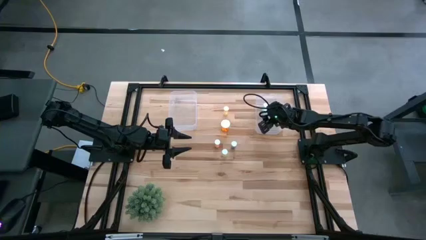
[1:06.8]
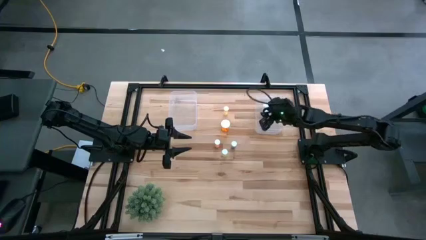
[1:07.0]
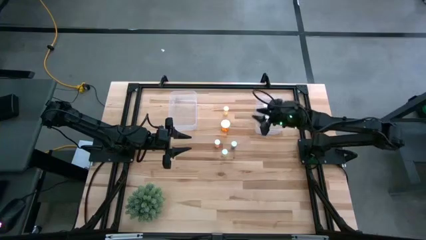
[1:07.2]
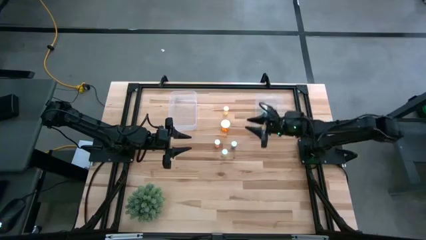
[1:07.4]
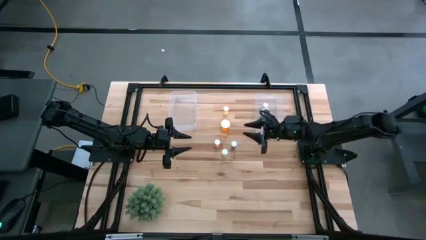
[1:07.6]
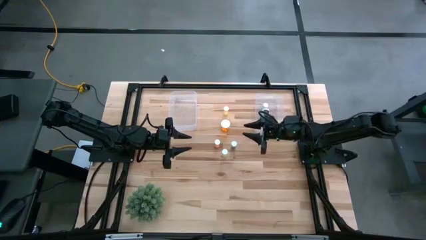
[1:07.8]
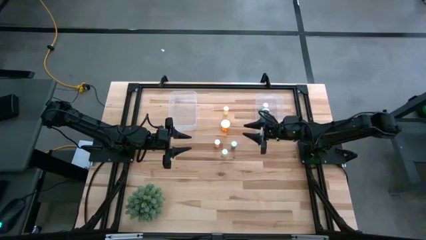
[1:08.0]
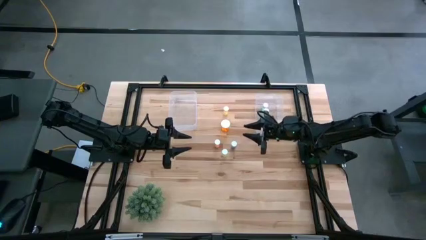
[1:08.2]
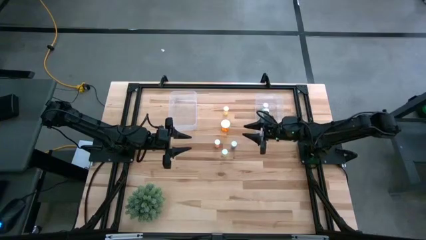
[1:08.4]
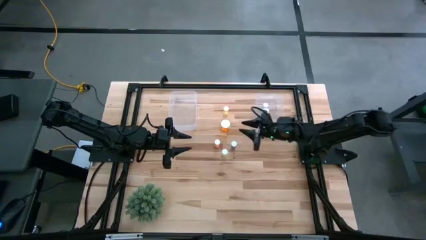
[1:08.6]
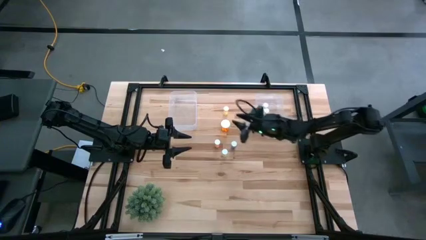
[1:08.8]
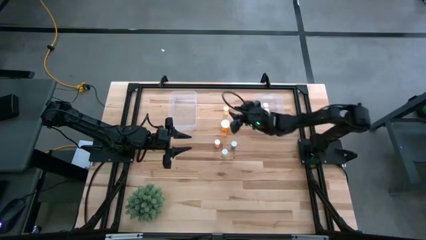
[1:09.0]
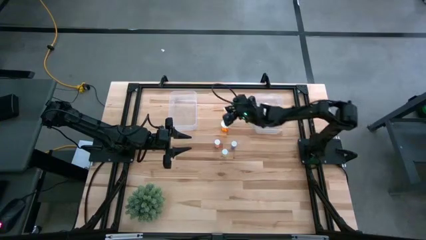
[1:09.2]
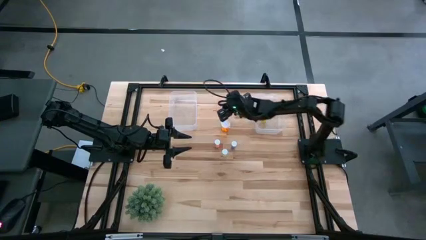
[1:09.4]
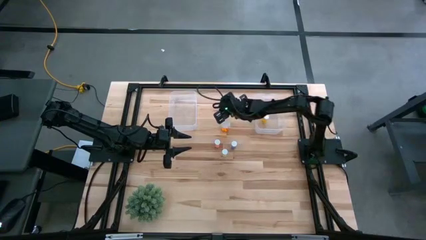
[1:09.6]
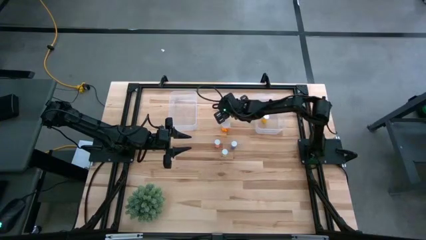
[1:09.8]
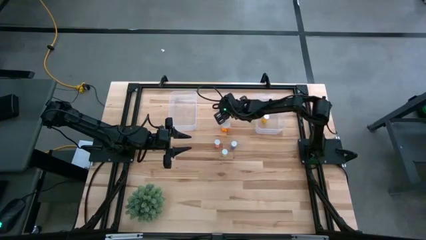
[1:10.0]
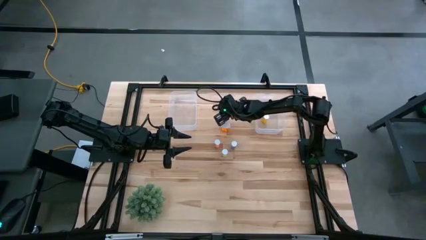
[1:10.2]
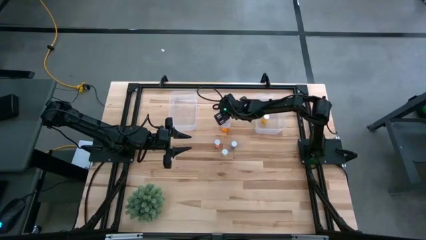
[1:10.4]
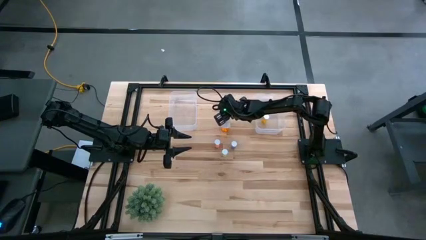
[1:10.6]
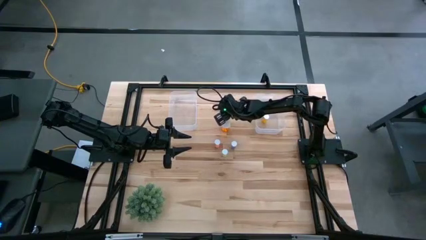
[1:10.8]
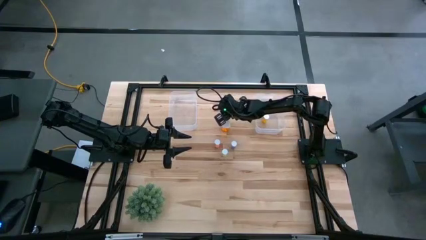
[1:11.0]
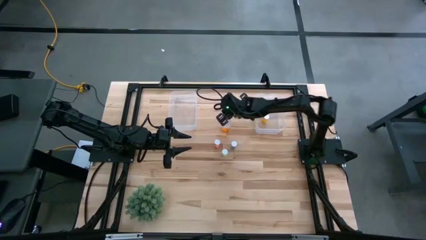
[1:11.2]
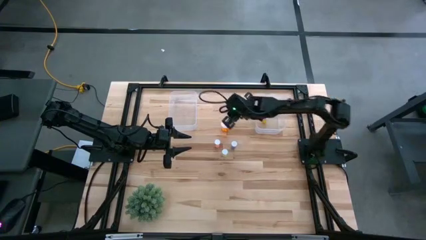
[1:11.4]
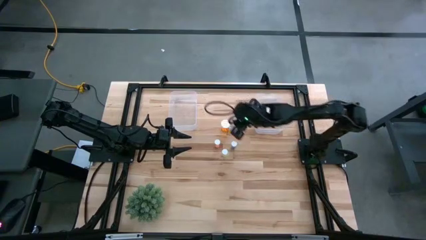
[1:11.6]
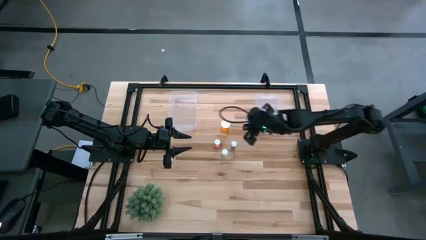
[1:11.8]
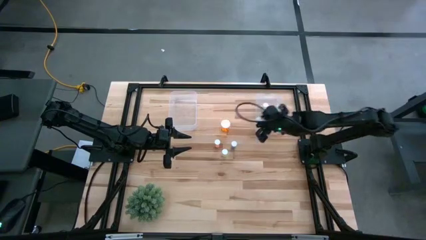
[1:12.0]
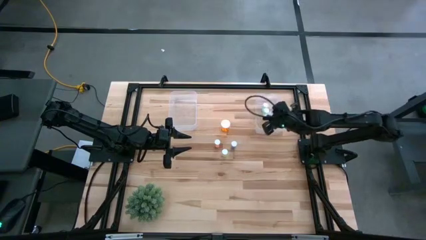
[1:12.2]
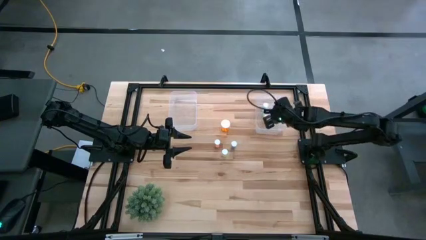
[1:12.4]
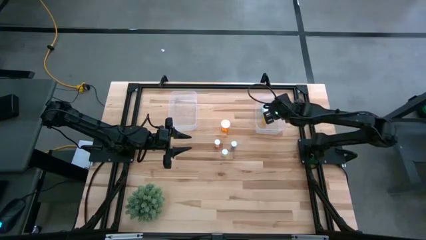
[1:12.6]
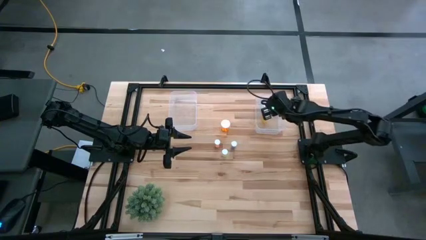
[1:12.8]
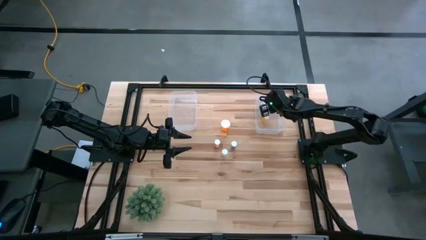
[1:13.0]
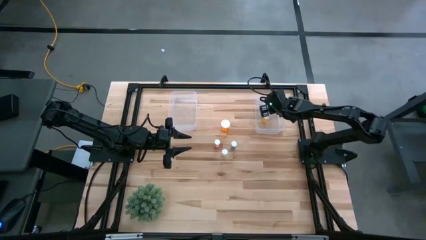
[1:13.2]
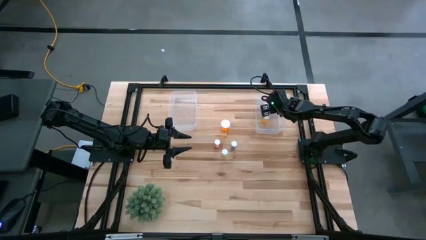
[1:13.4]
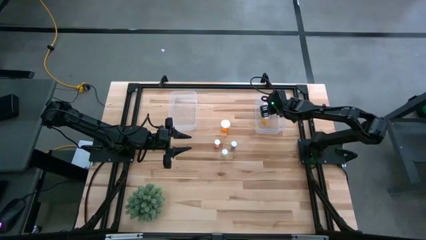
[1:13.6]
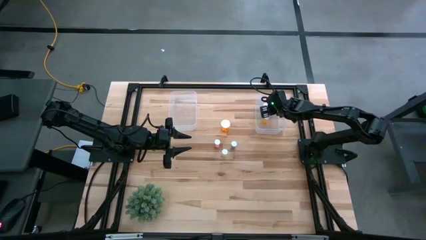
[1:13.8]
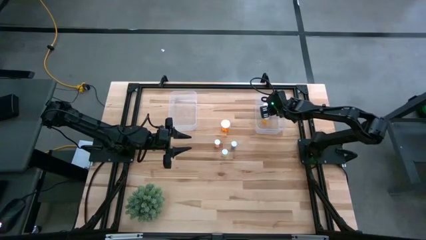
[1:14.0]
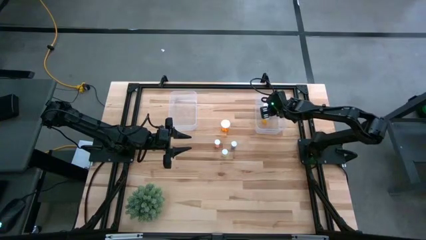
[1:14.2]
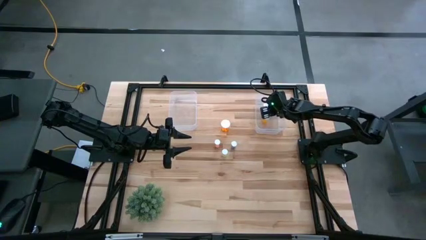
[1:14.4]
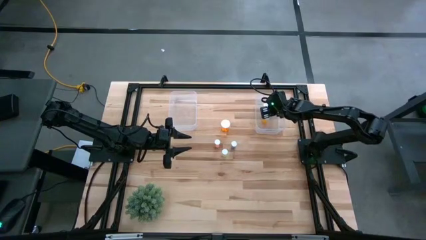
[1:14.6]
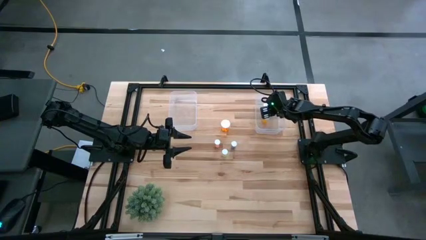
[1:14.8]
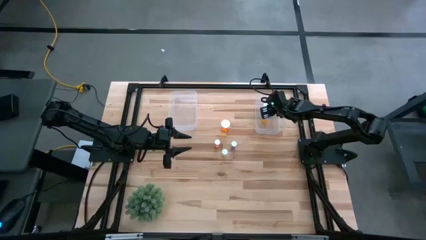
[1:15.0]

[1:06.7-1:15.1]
Task: Pick and place medicine bottles into bin by pill shape (circle, oval)
Put the top yellow tablet bottle into the right transparent bin

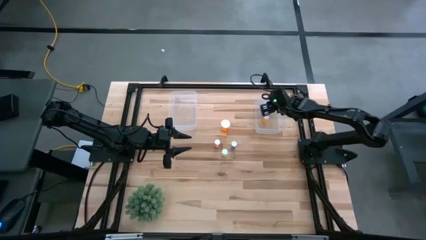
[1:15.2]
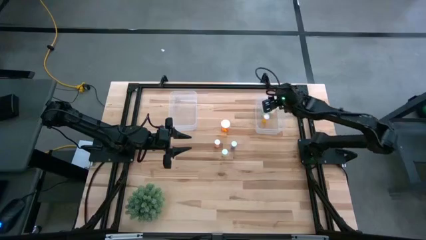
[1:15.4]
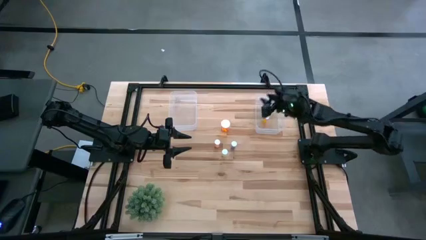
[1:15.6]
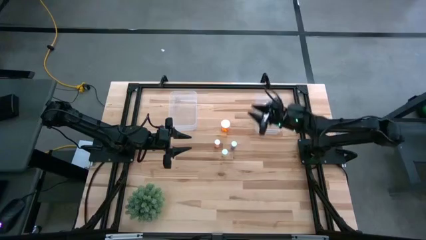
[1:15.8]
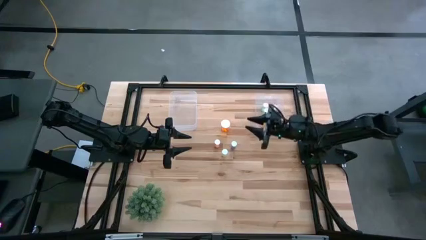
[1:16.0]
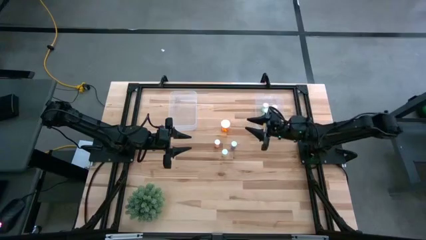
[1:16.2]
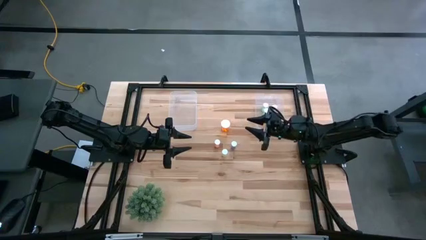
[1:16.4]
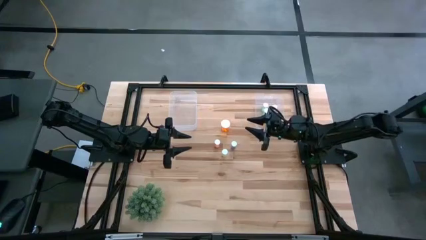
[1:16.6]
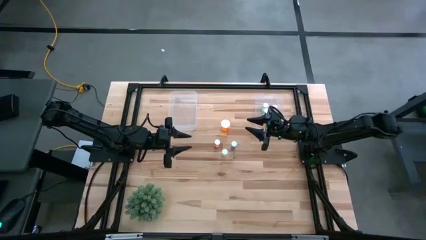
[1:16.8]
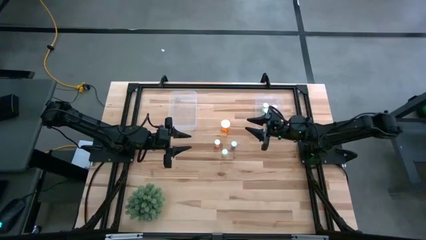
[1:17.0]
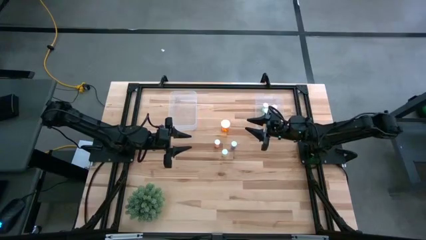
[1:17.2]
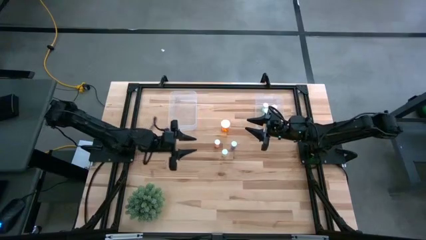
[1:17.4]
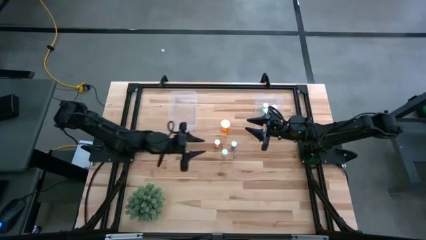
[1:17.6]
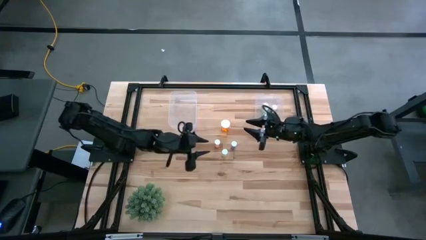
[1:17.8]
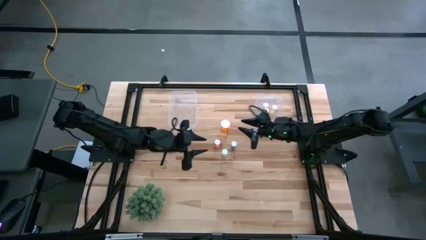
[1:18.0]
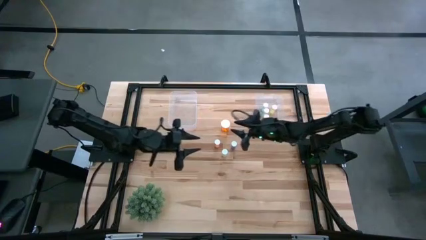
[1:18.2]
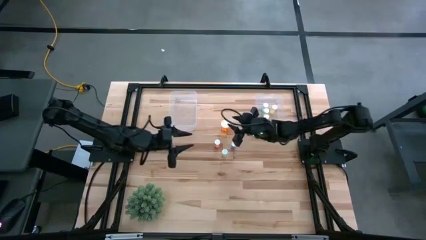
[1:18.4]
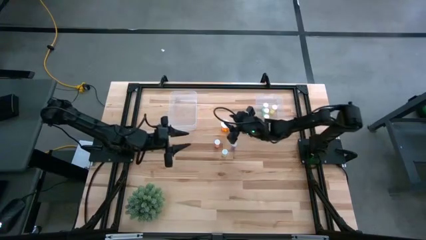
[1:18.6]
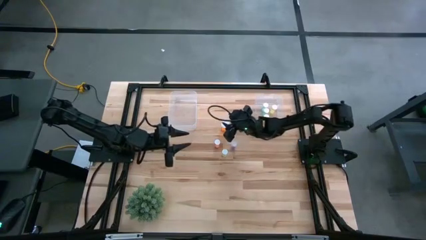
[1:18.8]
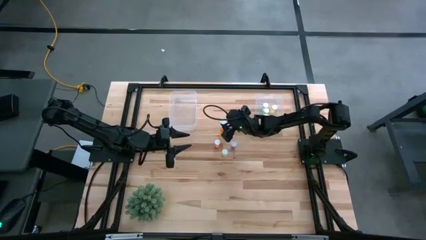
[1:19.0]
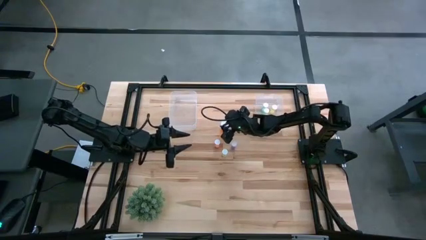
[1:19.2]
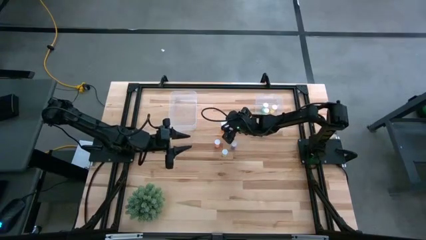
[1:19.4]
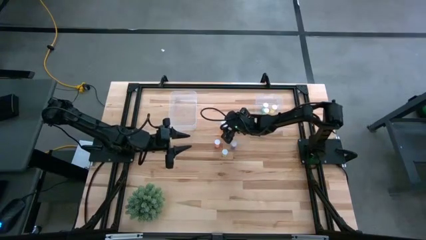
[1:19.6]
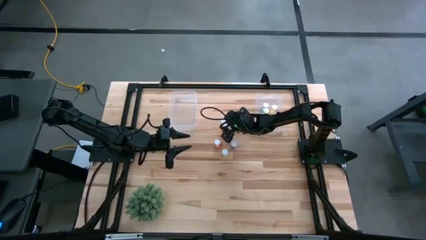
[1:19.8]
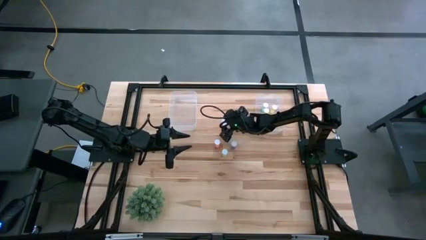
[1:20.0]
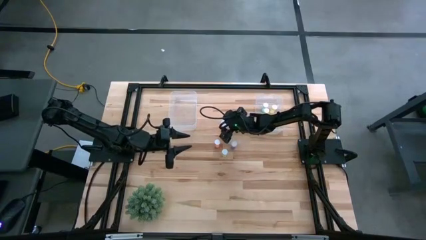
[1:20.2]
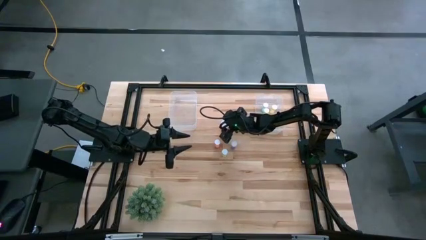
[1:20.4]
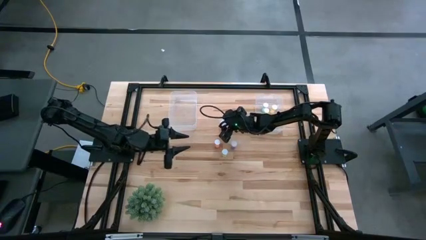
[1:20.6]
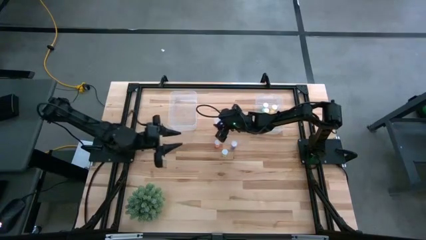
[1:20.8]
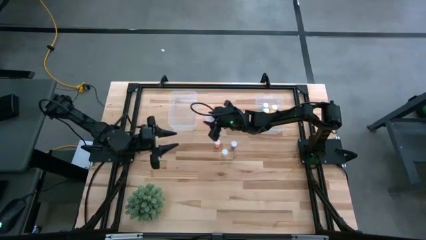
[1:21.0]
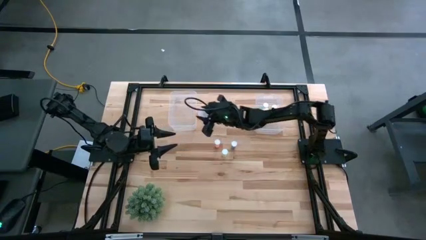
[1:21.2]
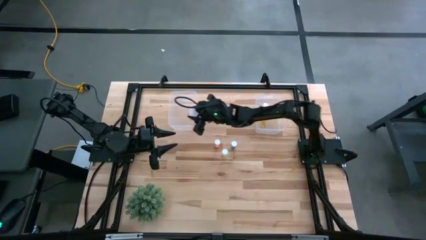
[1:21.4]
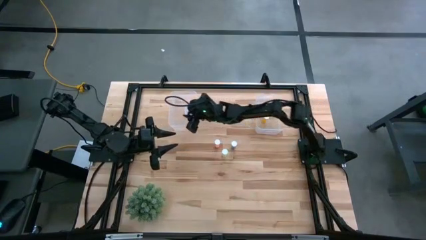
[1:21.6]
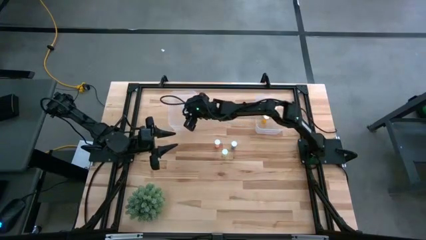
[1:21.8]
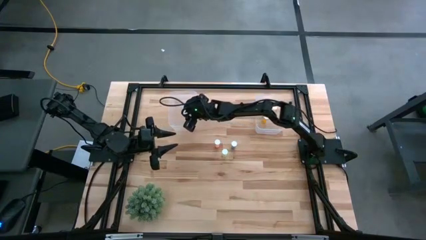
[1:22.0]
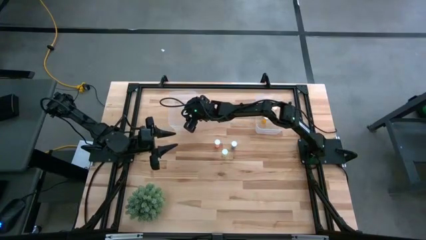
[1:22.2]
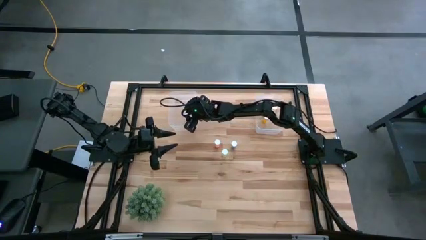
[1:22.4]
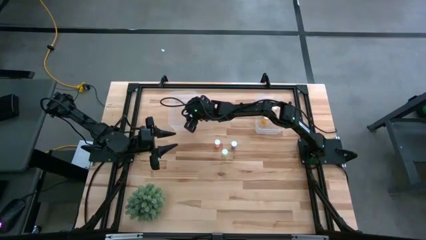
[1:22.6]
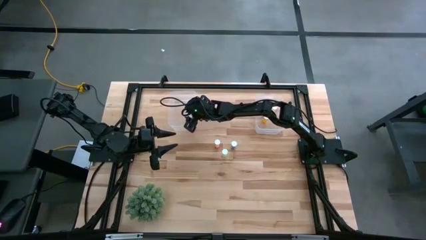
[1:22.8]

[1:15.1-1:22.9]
Put the large orange capsule bottle into the left transparent bin
